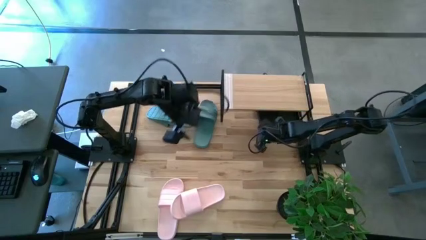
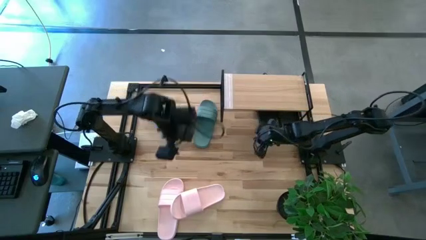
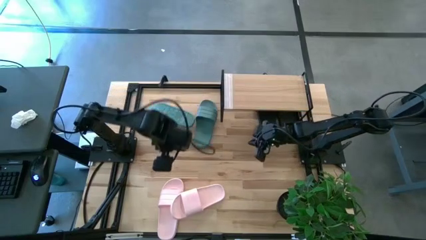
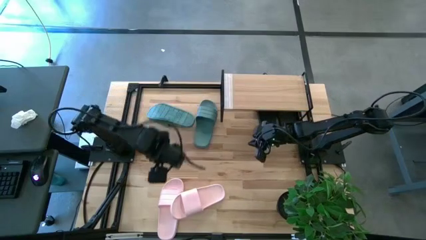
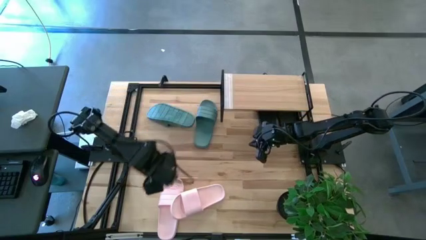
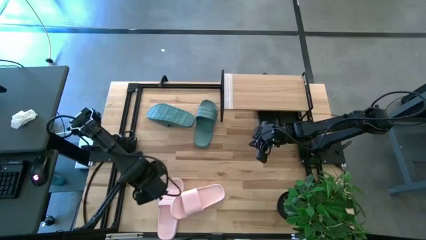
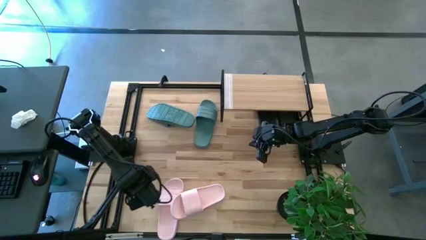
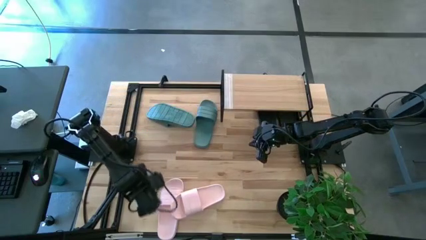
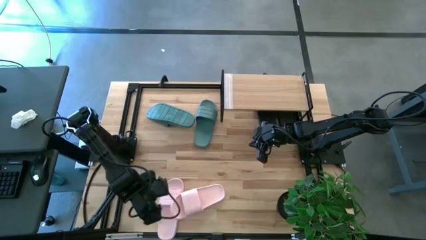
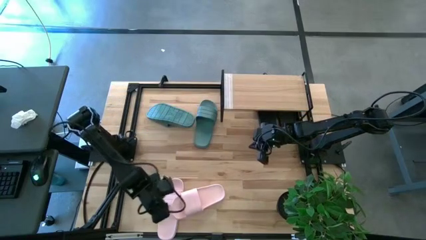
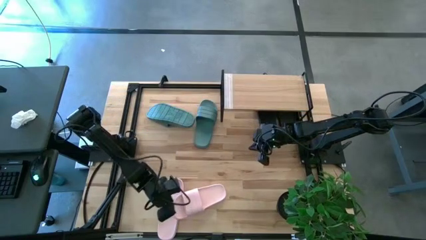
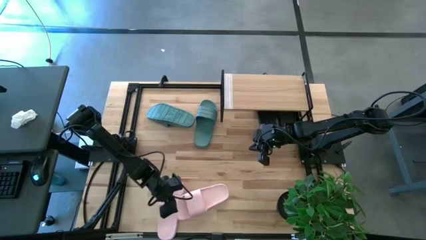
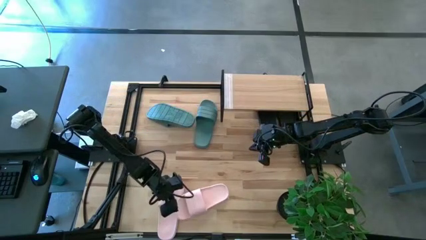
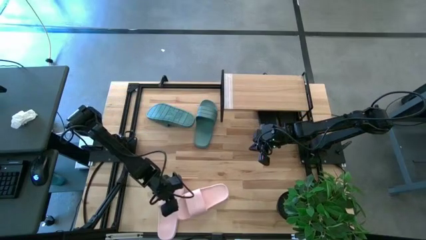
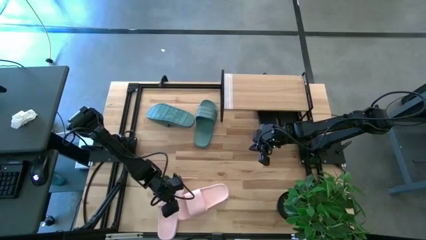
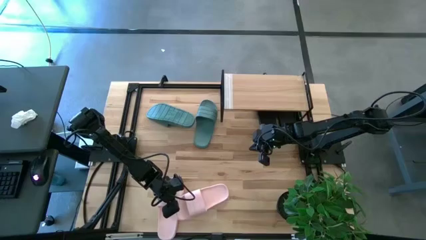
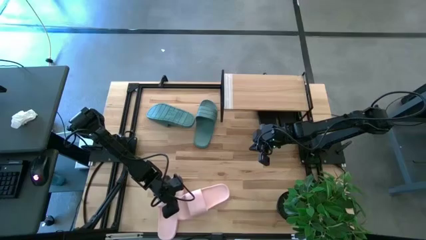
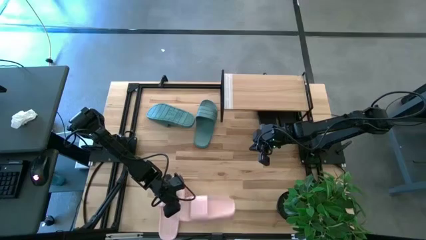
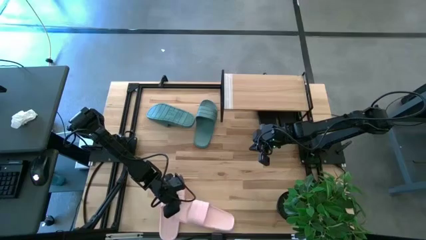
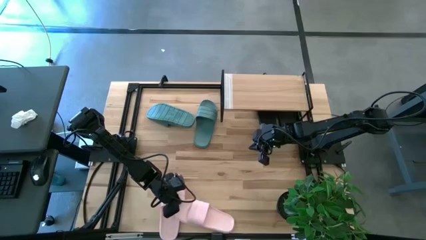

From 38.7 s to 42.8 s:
Task: Pick and place slides into the shelf
Put the right pink slipper under the shelf

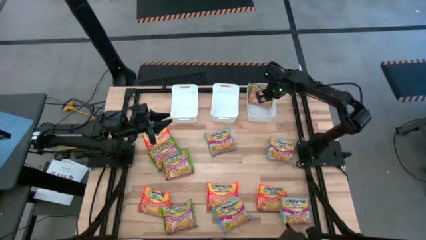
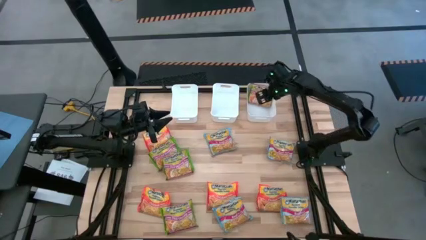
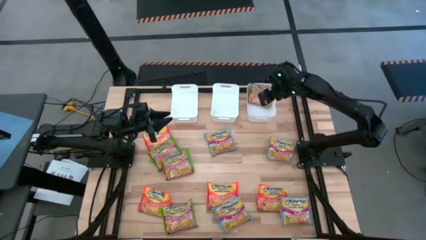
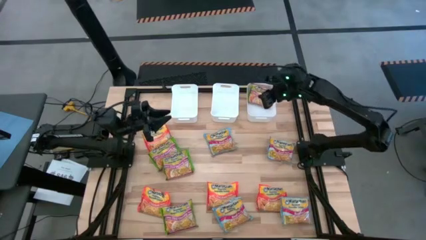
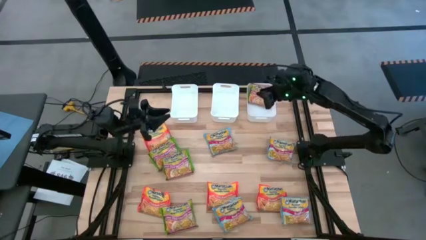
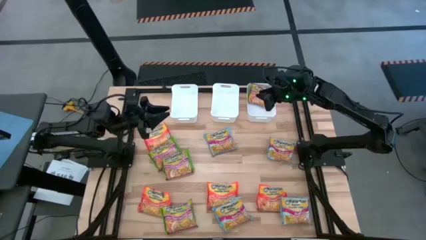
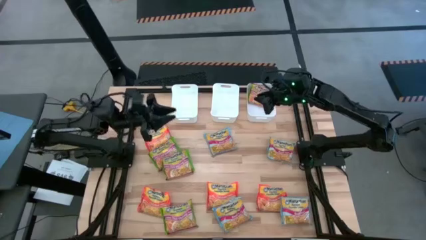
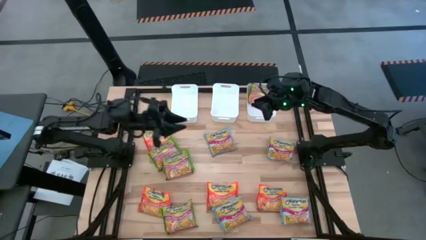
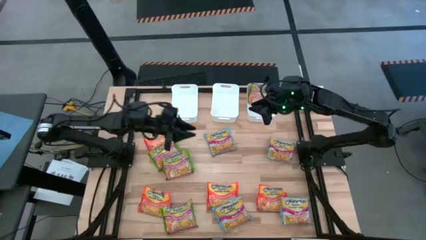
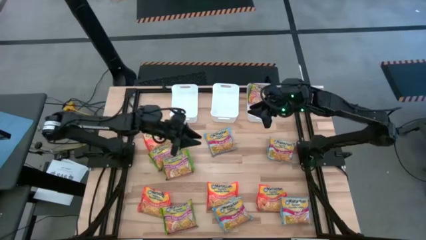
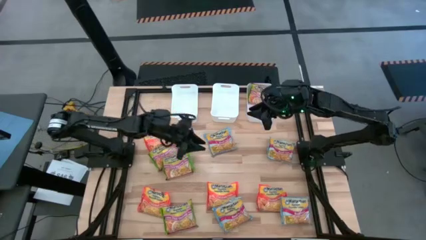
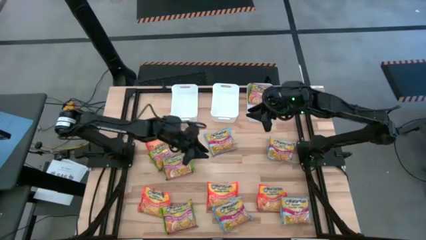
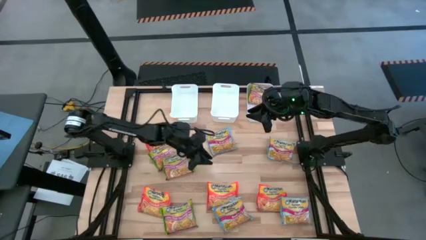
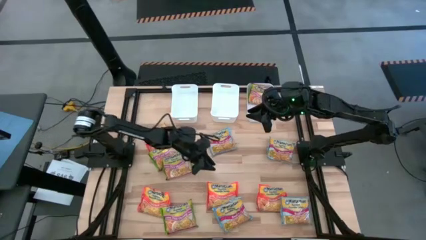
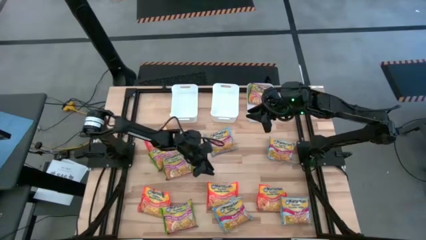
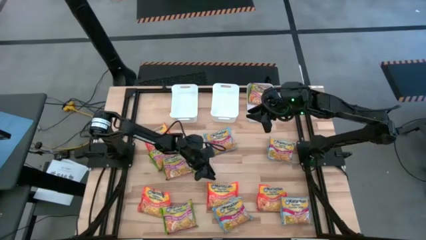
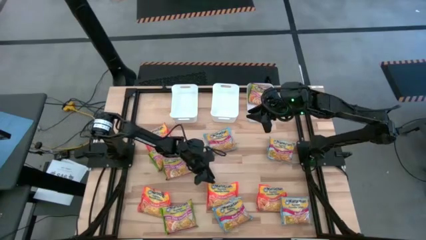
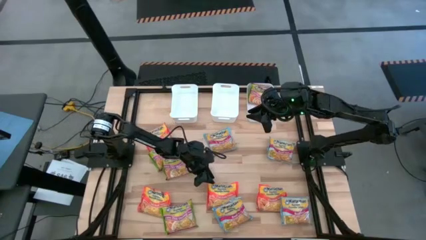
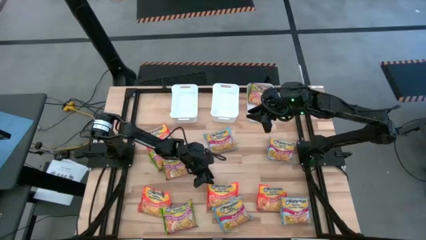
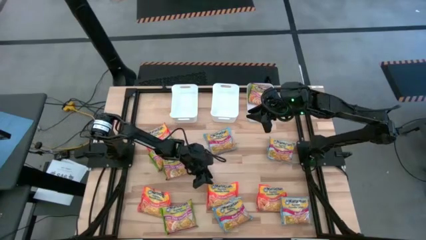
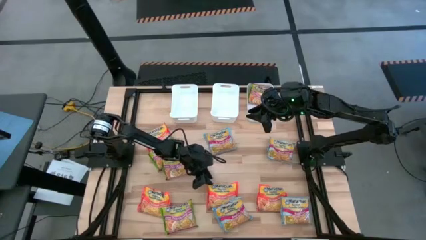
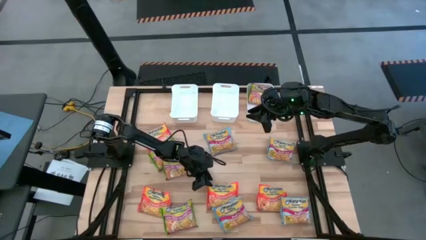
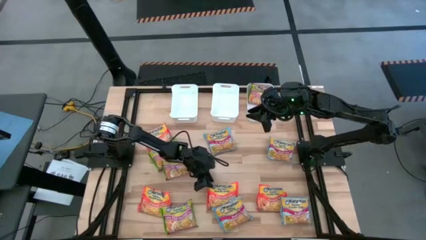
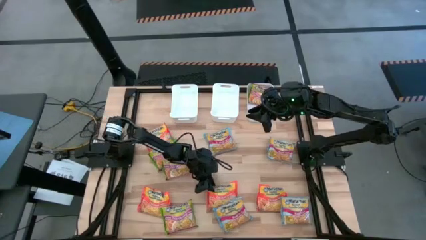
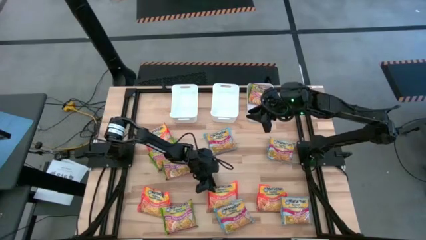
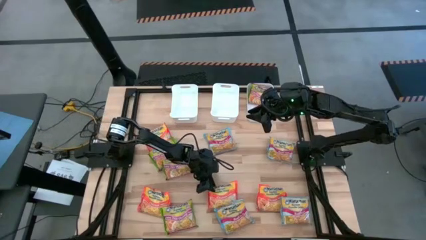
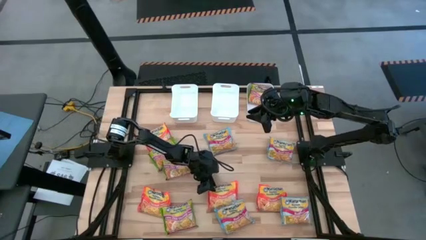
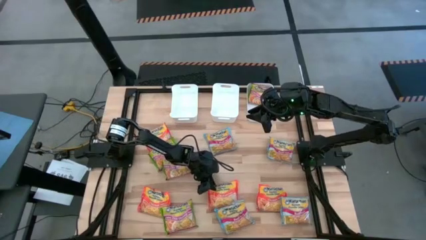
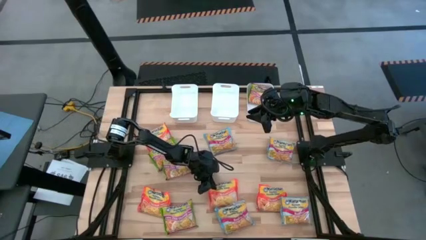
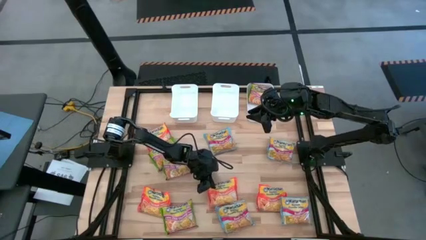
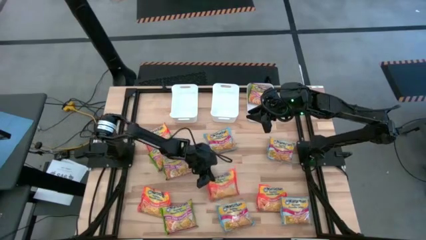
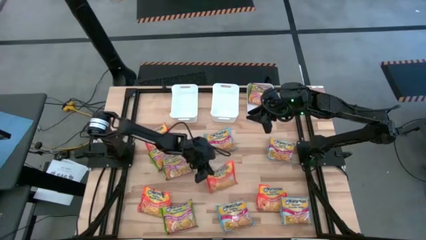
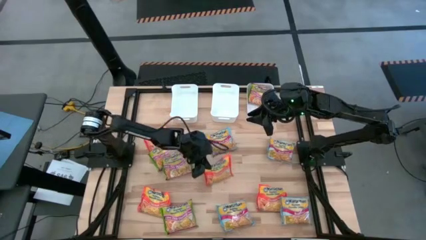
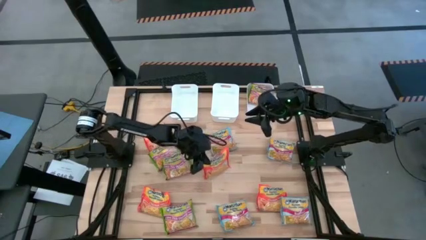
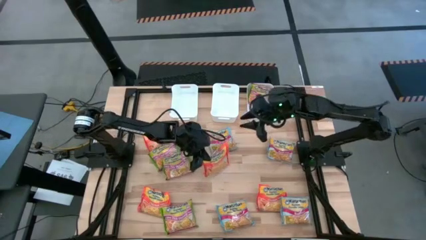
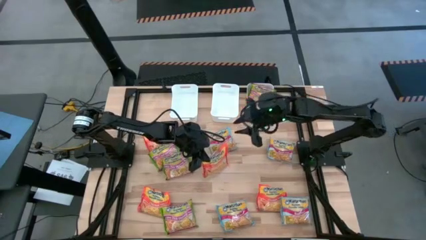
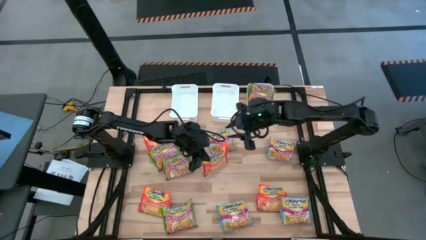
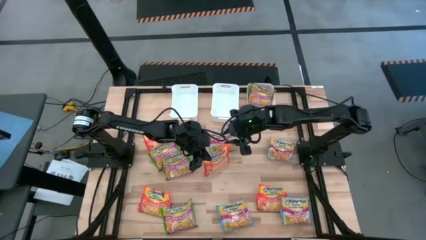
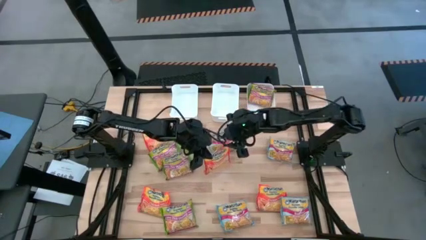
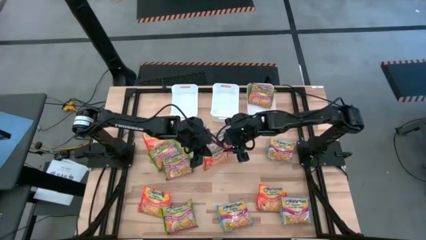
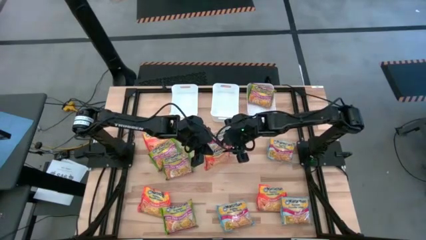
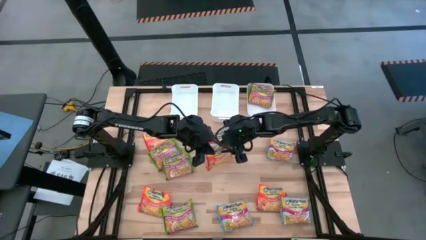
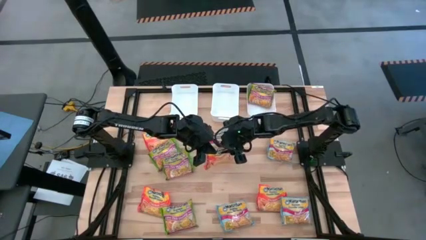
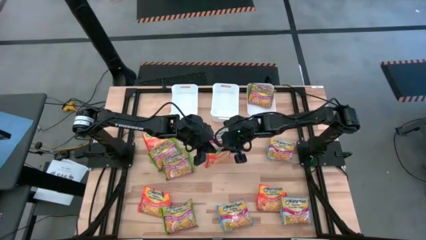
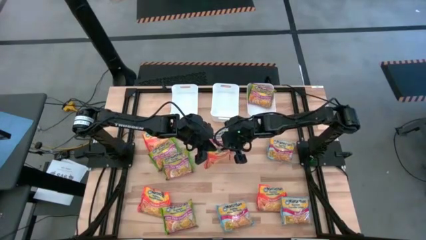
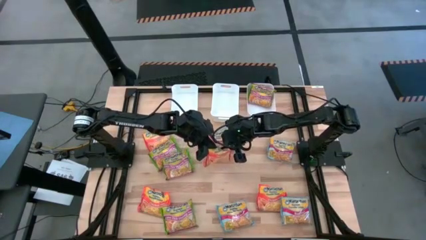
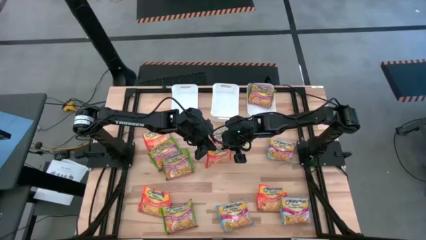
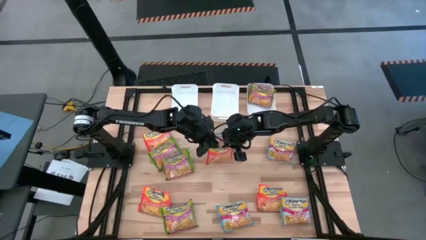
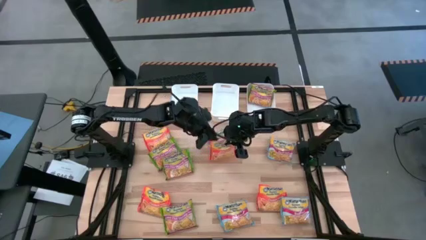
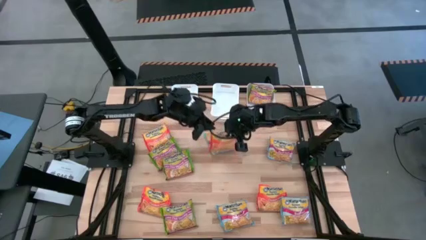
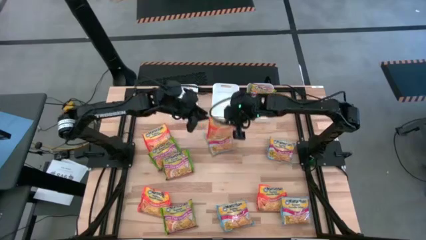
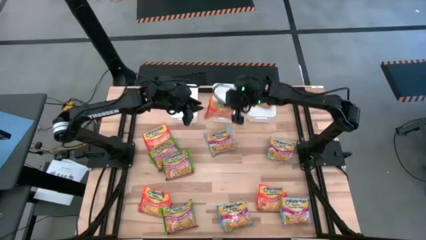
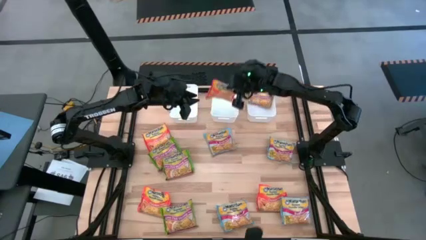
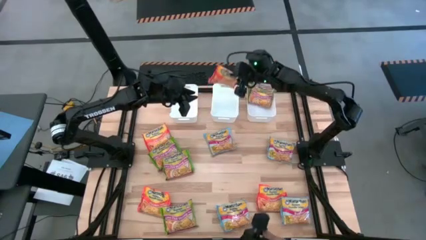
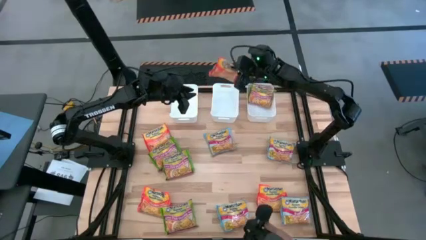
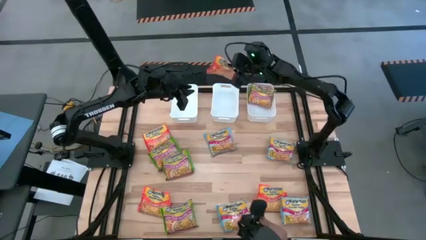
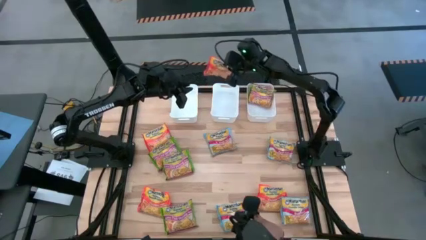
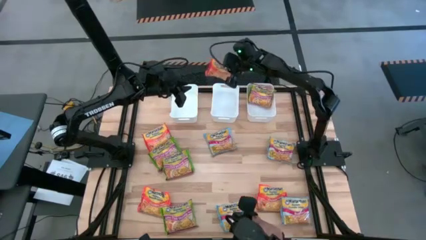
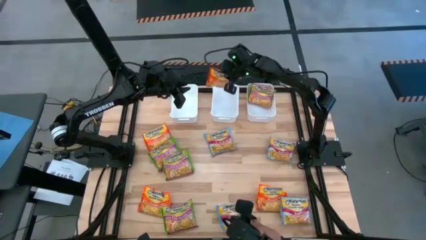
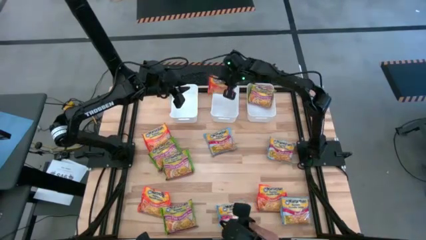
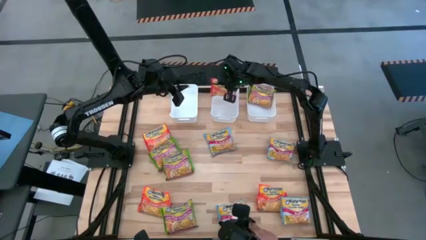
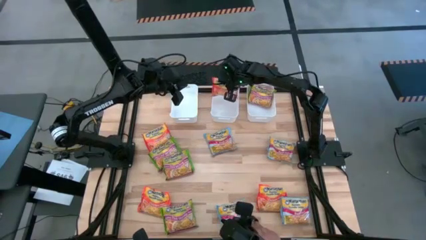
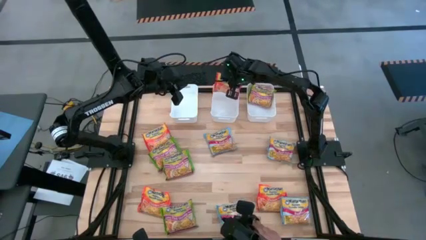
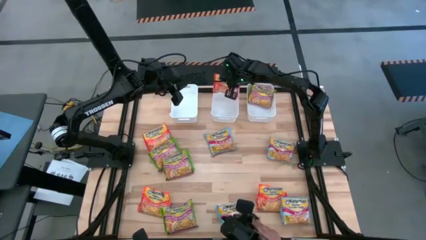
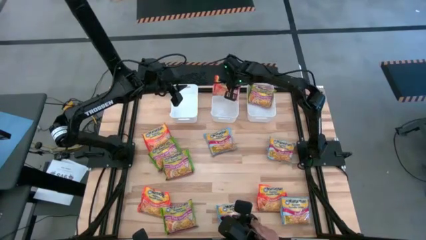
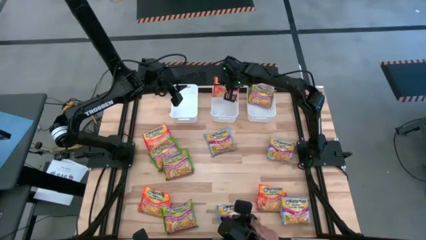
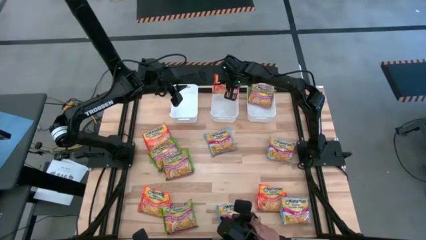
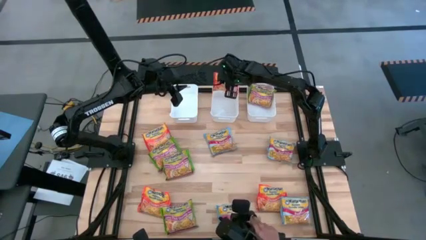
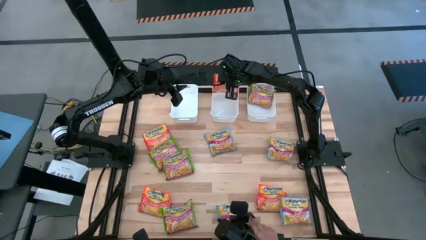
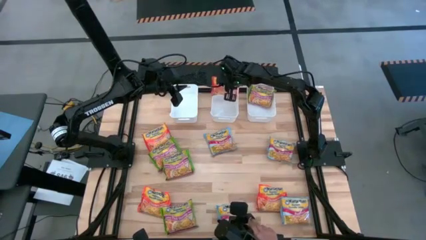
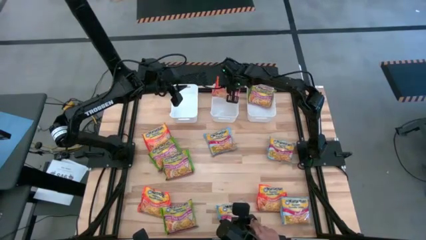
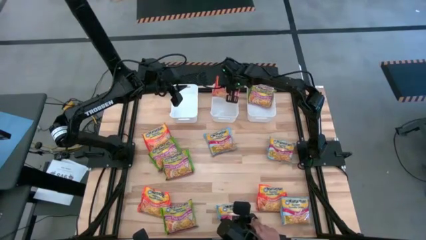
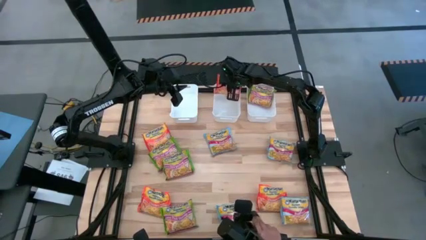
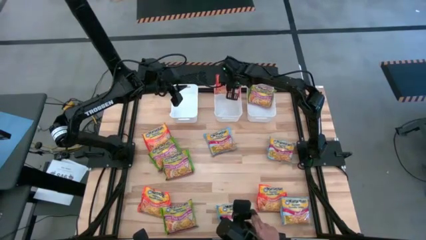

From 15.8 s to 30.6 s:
Task: Sort Maruchan noodles
Put the orange noodle pack into the middle white bin
